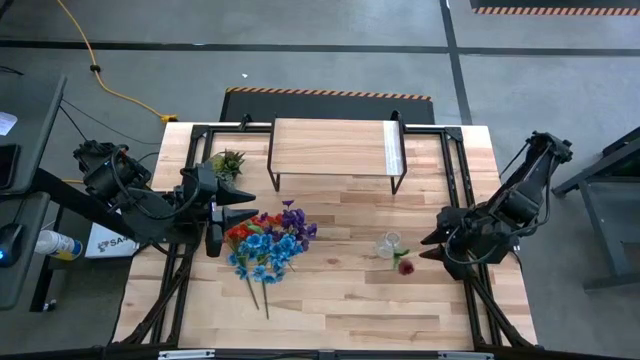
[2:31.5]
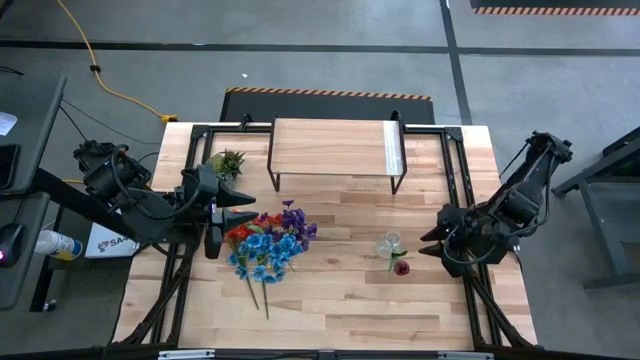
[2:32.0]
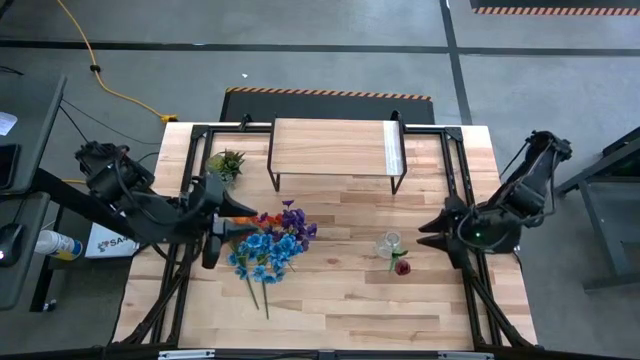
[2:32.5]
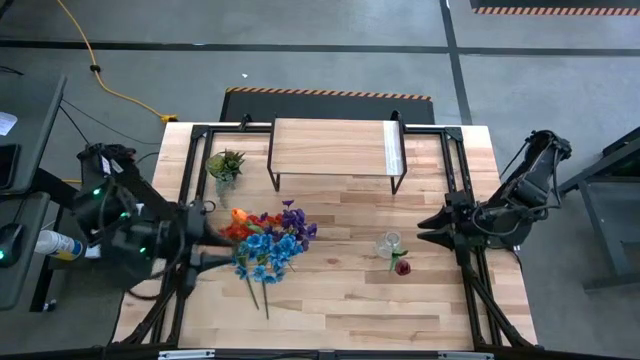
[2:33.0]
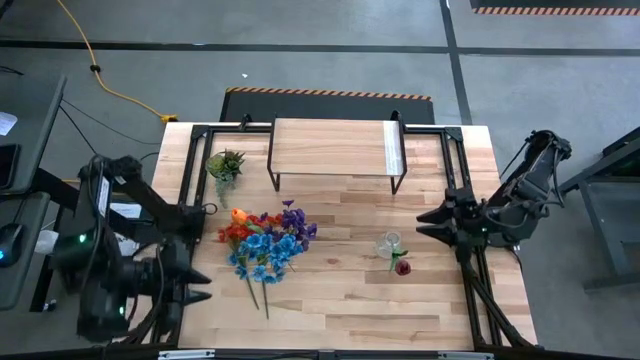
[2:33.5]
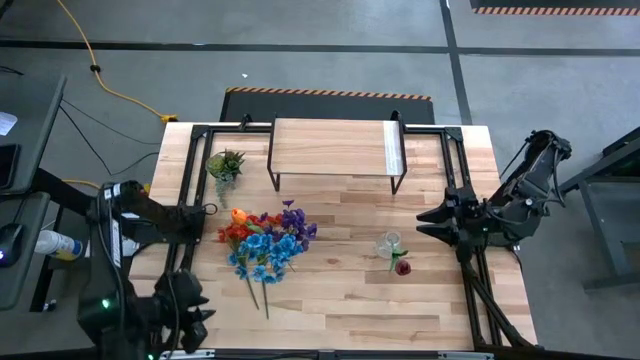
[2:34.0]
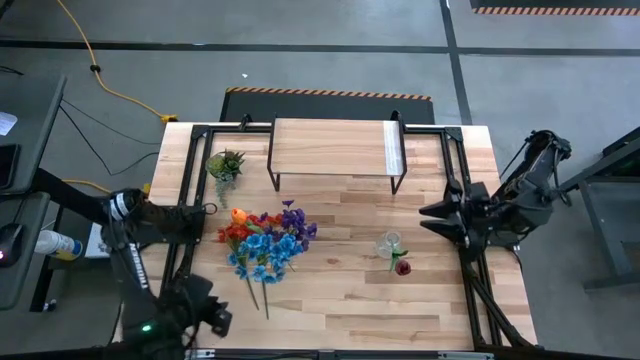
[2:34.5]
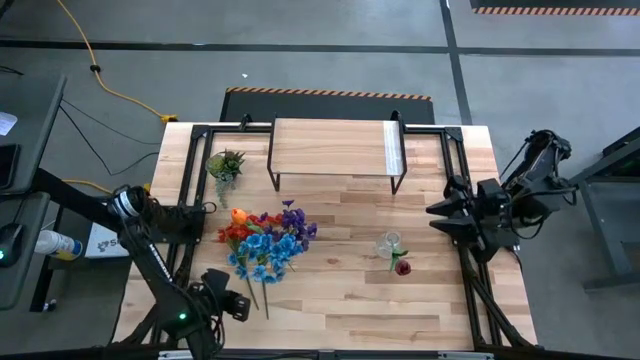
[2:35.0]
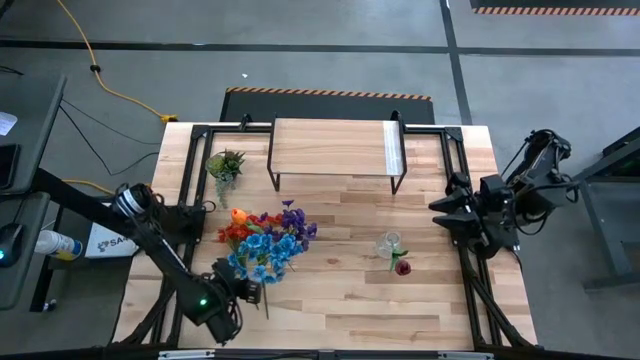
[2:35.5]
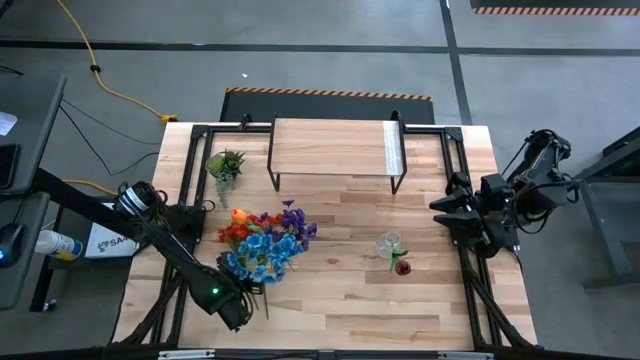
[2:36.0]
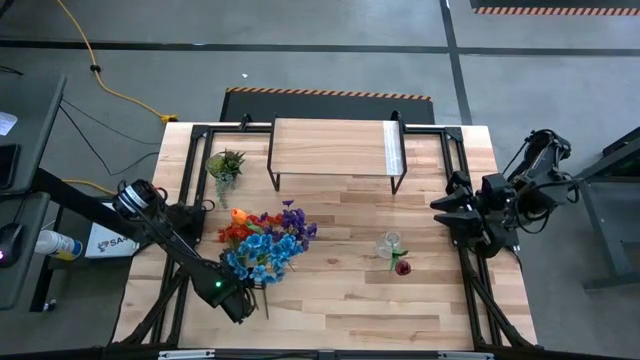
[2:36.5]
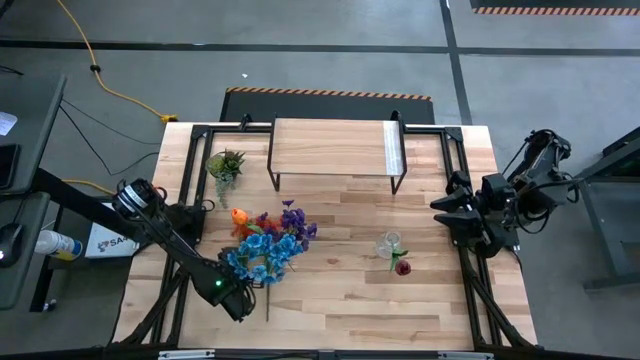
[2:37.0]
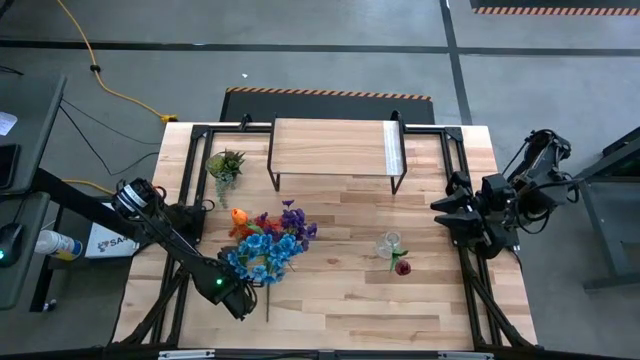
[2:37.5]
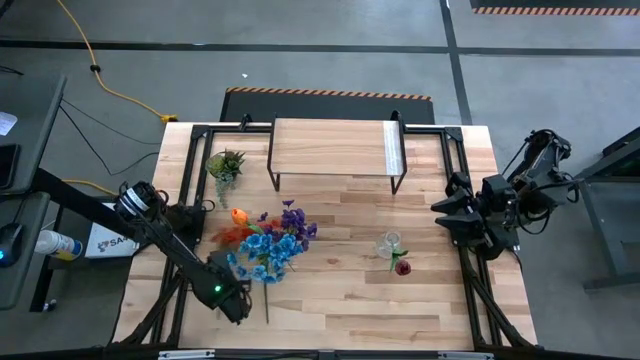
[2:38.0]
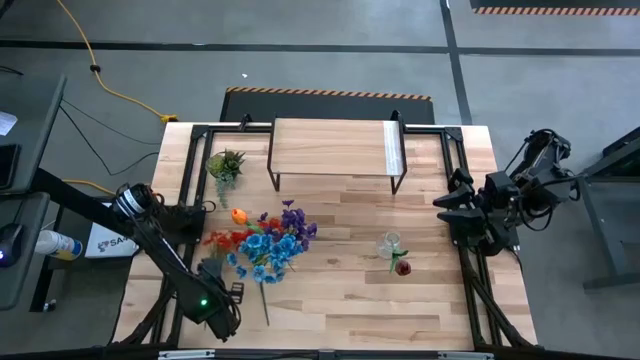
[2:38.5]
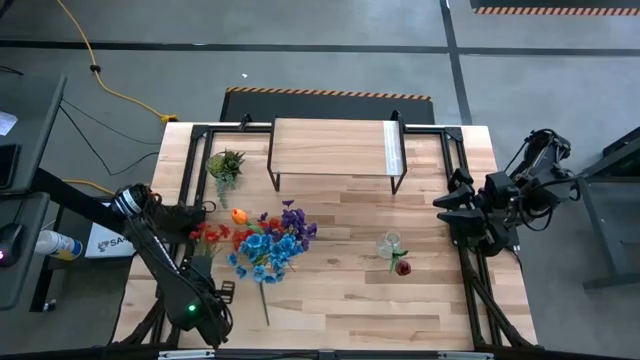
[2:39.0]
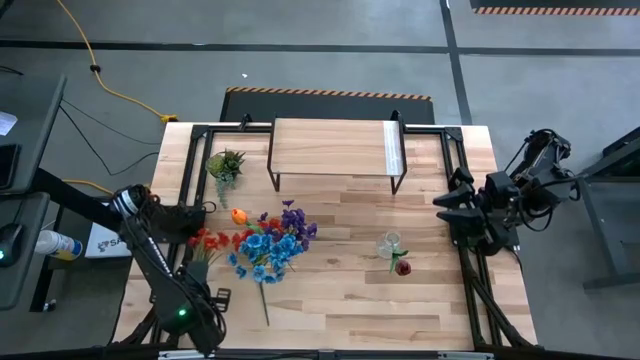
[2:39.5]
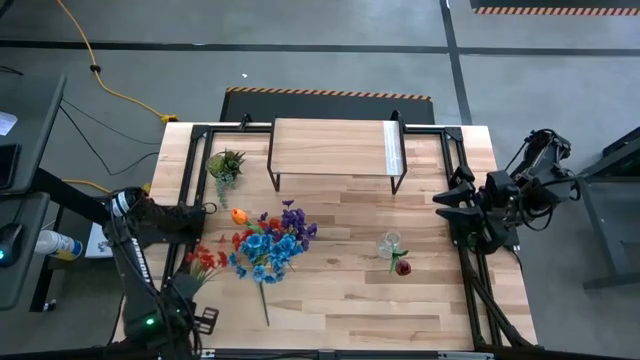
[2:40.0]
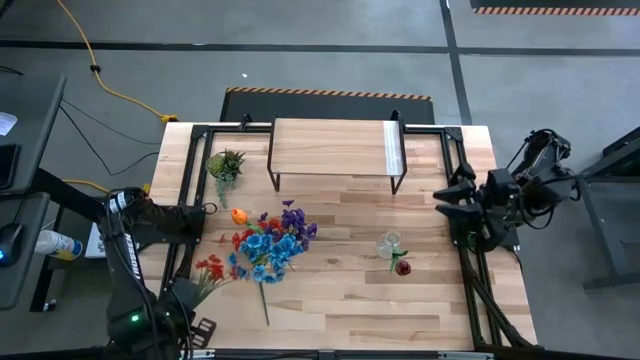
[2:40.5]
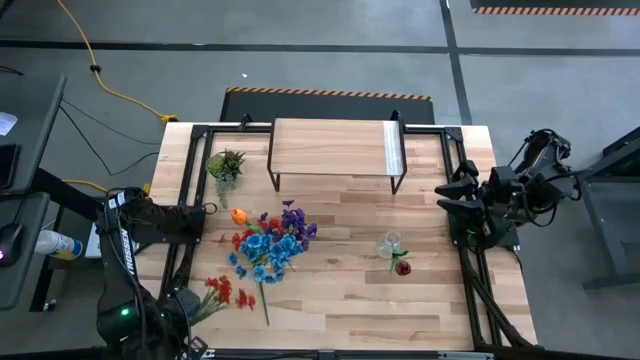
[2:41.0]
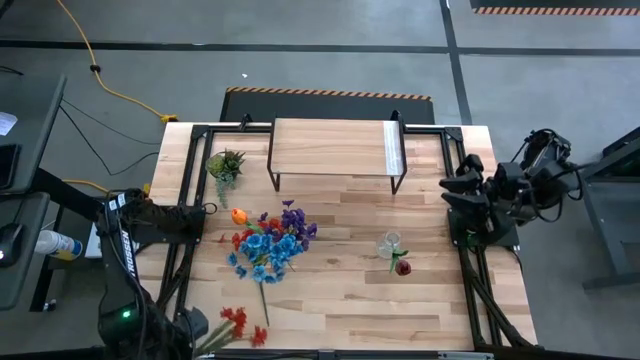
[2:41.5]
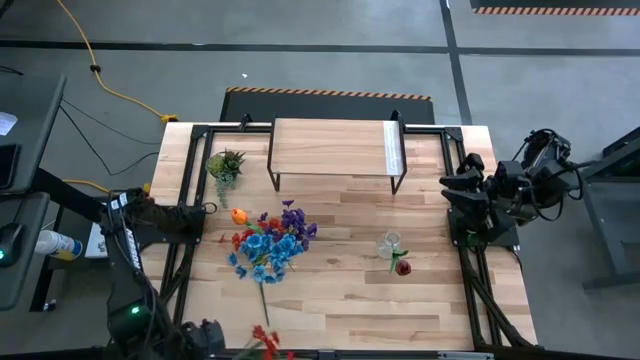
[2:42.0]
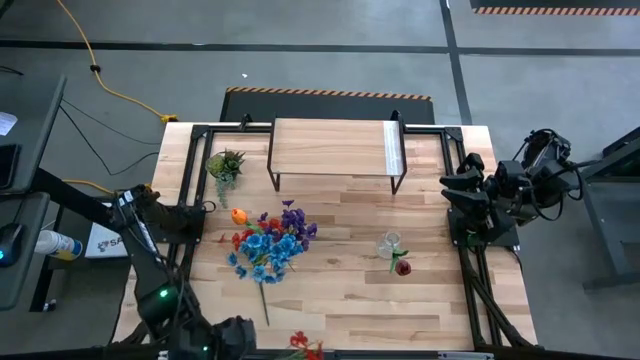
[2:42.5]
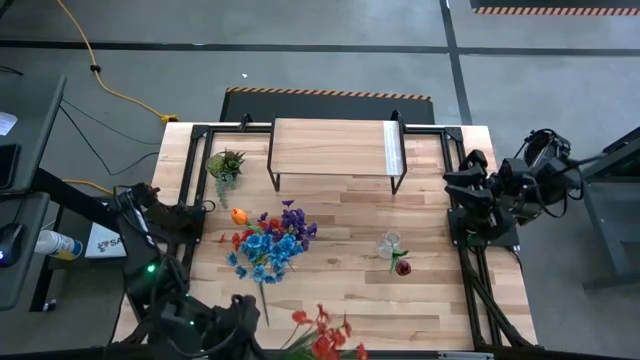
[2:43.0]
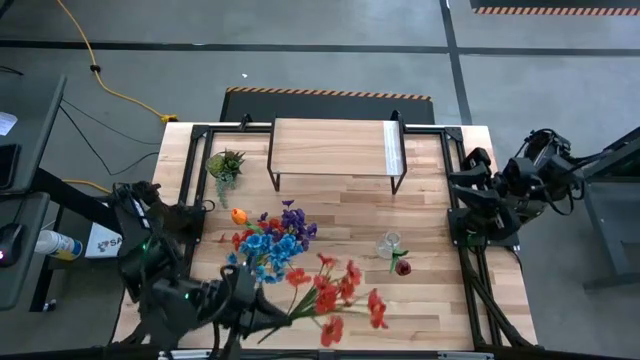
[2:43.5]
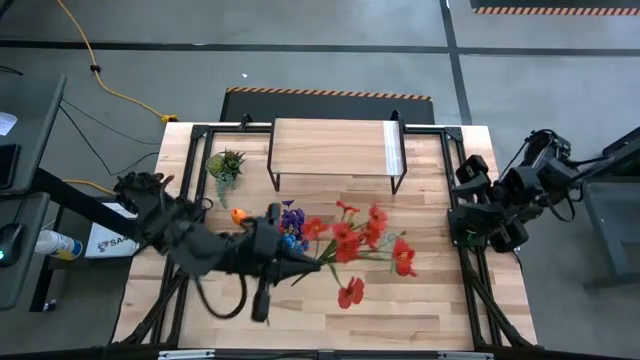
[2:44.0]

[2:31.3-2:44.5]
Task: Pick and place flowers into a vace then onto a shelf
Put the right red flower into the right transparent flower vase

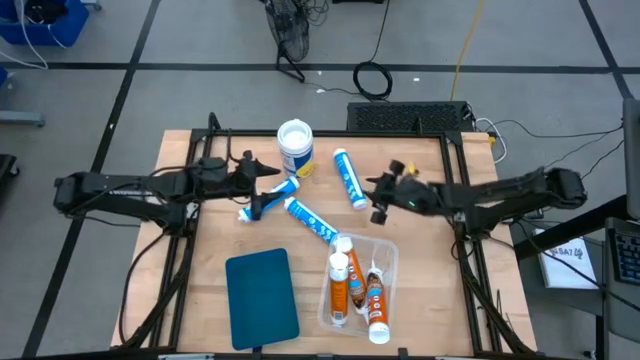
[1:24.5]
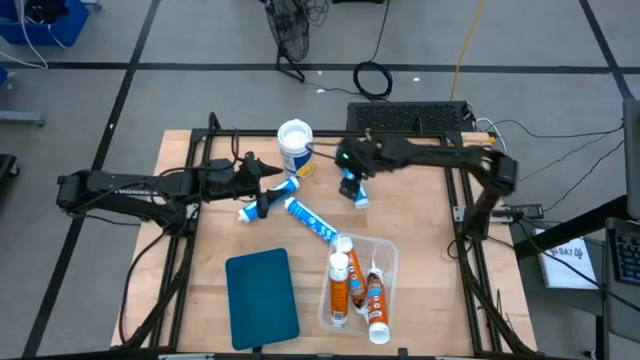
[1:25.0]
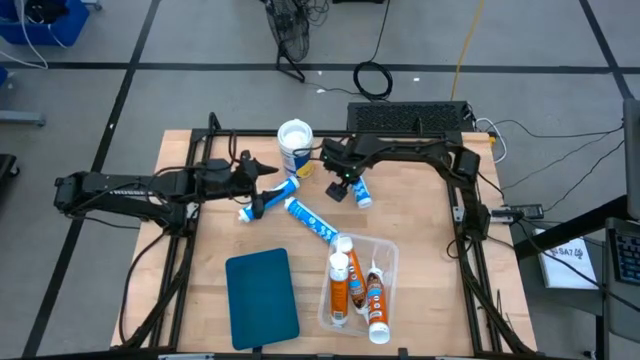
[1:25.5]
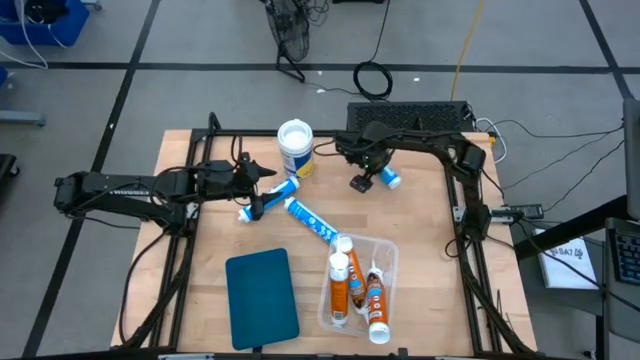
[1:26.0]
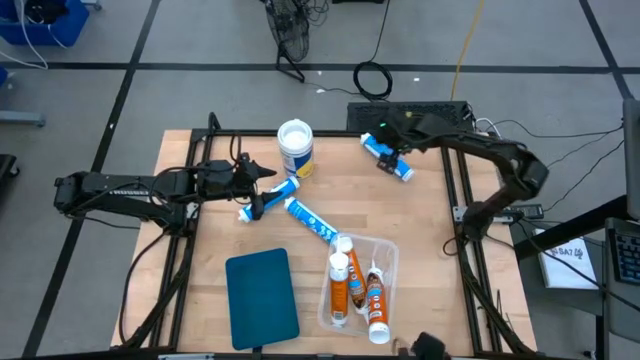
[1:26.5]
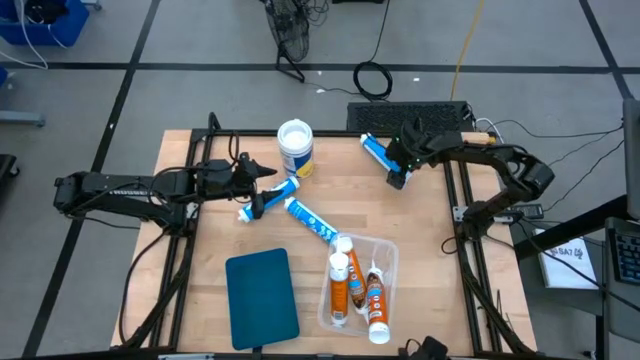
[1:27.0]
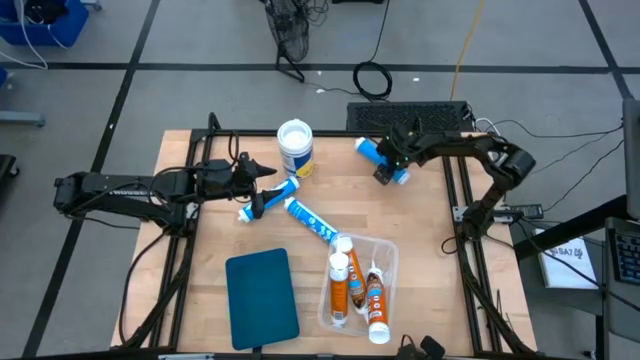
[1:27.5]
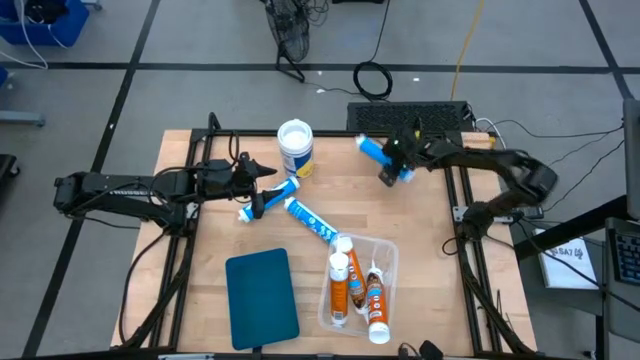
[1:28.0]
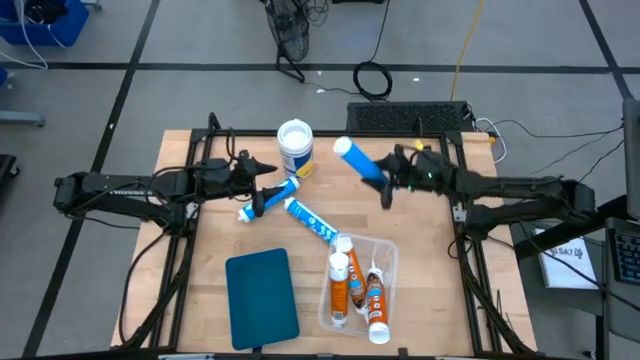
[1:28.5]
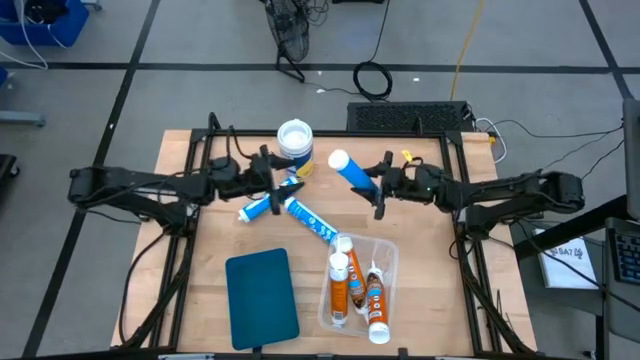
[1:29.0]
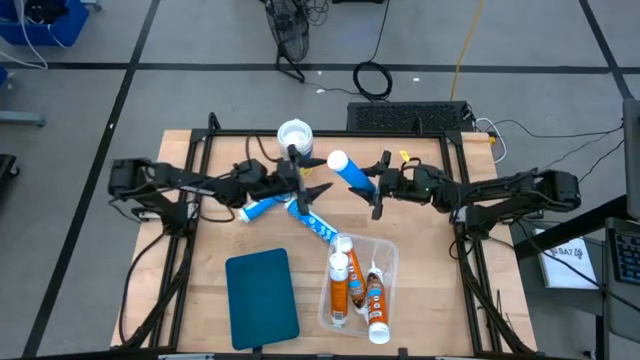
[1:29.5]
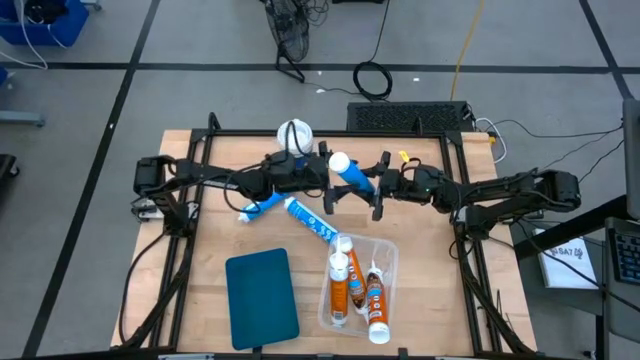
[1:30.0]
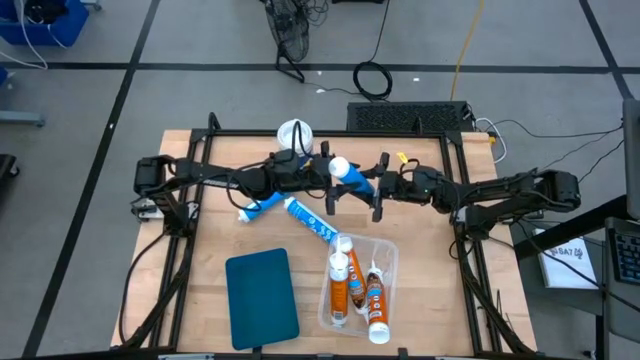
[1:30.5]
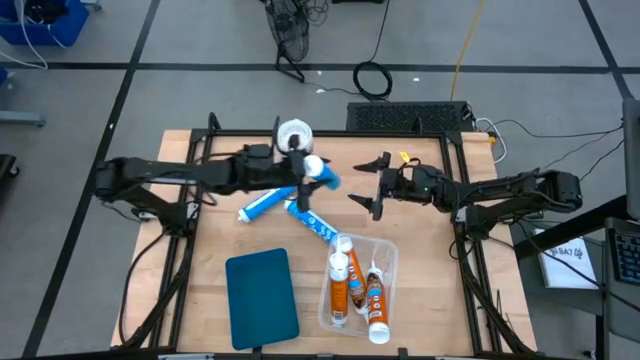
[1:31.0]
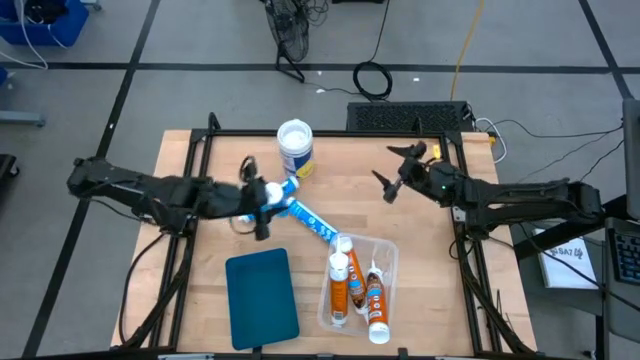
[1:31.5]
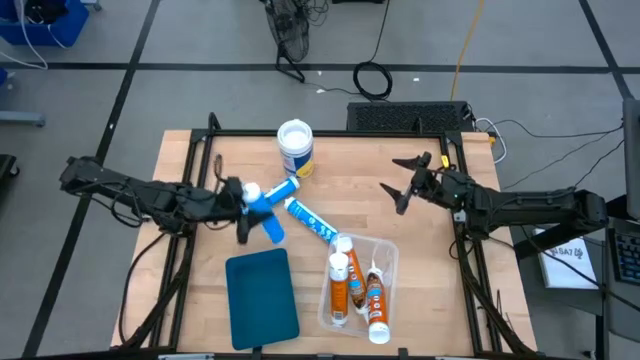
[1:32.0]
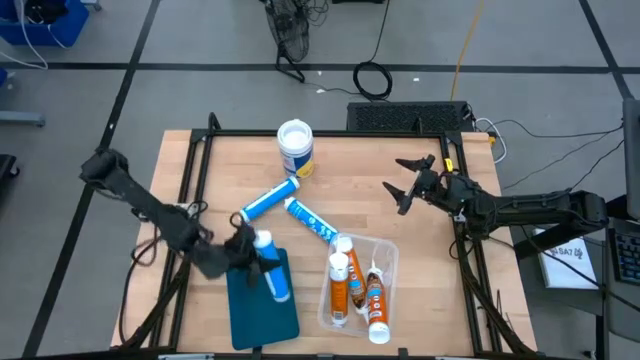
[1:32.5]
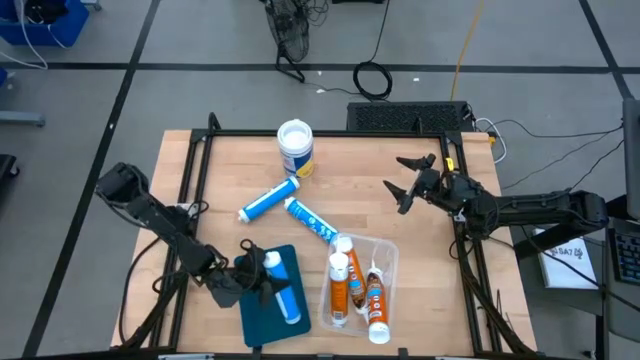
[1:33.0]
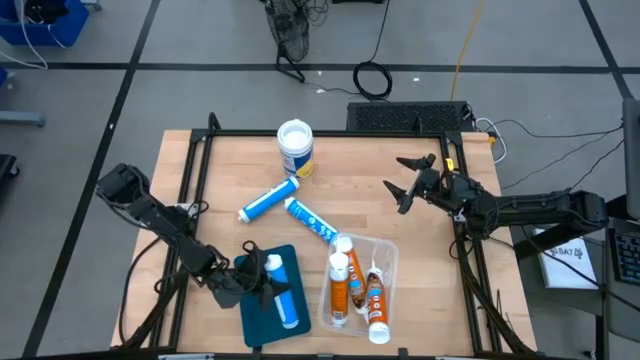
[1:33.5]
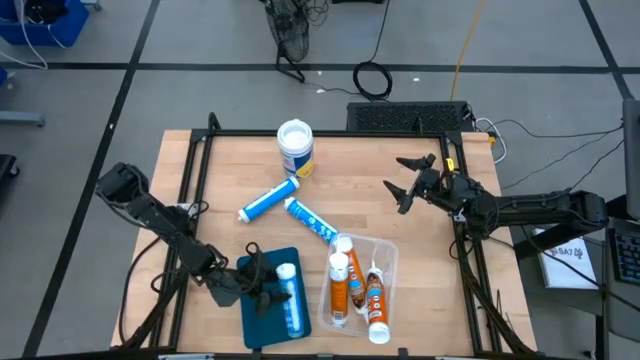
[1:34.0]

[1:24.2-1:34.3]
Task: Pick & place silicon tubes, Sealant and Lysol wipes
Put the right blue sealant into the blue bin
